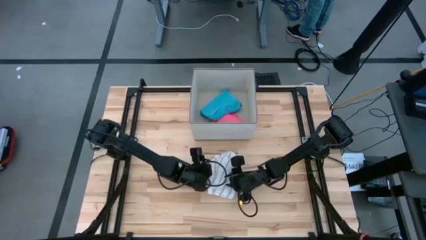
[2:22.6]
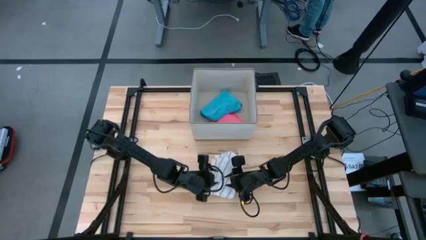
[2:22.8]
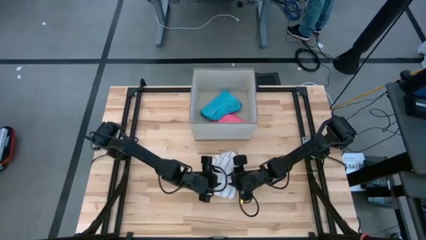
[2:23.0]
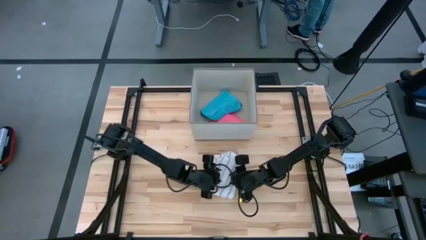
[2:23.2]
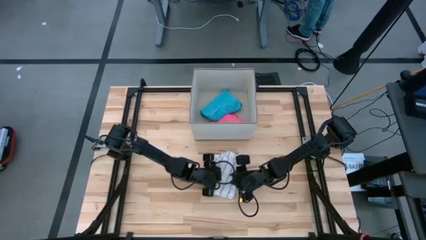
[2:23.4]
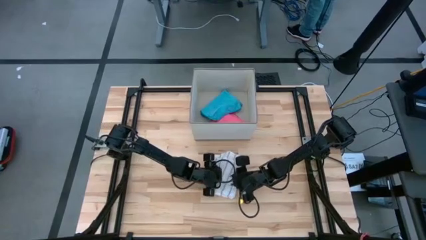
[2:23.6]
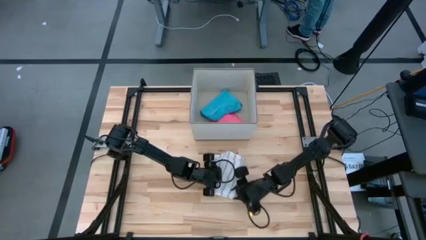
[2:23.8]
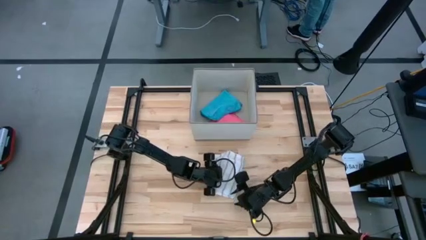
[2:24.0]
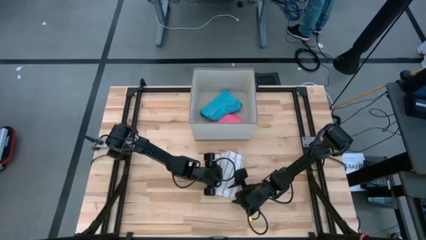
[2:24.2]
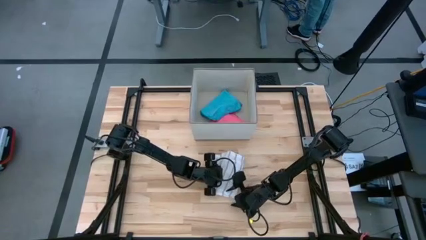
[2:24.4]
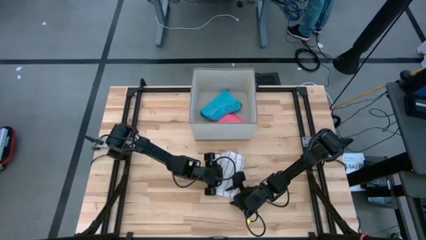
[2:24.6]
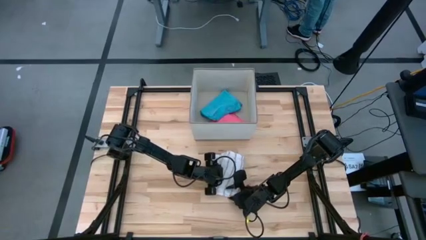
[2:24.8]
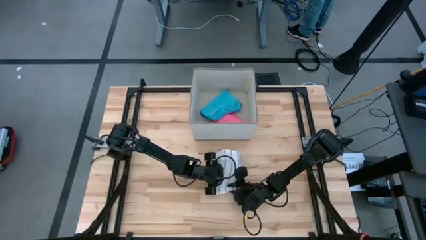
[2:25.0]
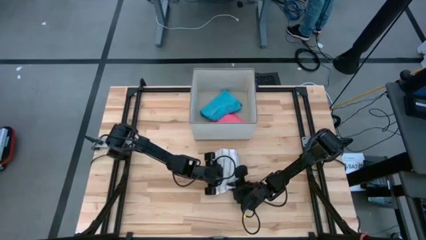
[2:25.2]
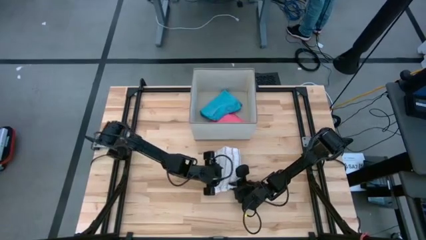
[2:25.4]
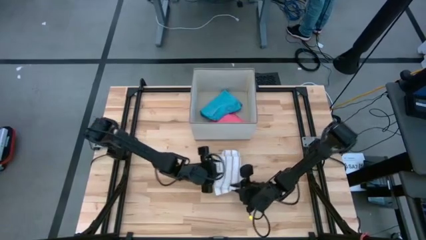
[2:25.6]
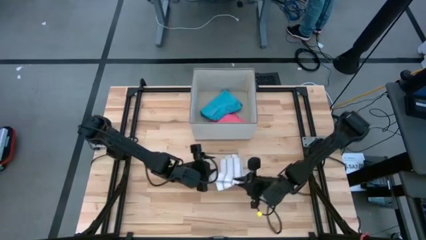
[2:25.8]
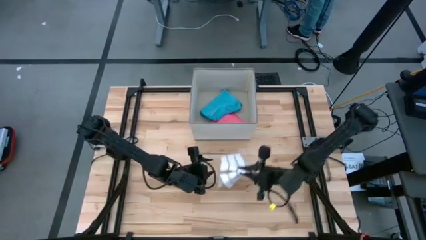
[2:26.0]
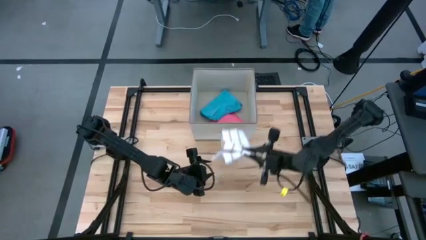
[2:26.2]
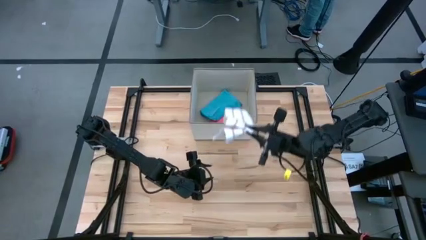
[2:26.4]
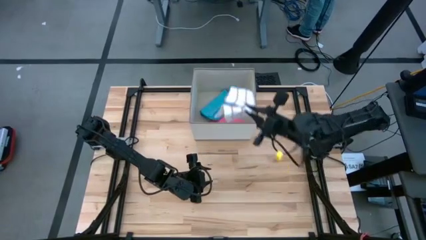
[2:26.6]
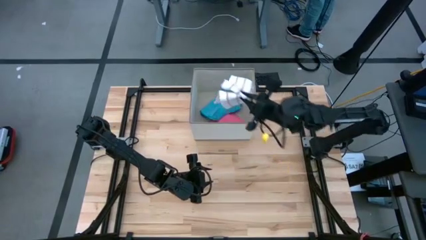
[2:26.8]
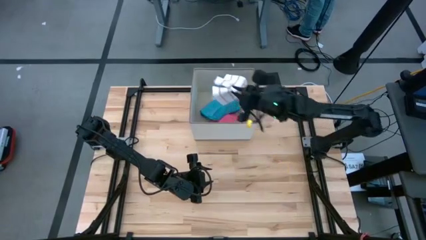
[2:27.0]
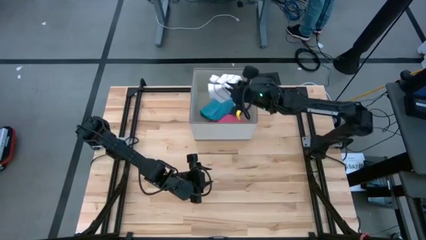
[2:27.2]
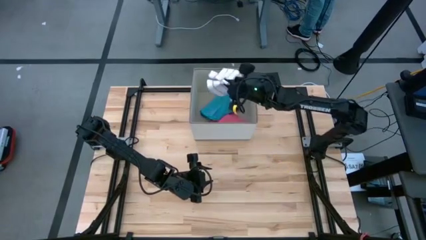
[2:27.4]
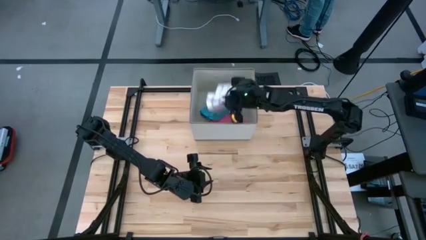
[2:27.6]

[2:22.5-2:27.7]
Task: Fold towel
Put the white towel into the laundry organizer

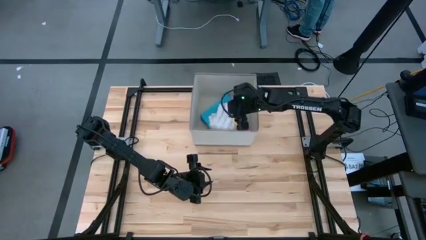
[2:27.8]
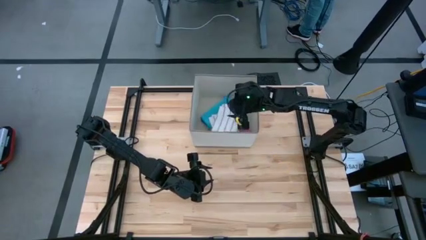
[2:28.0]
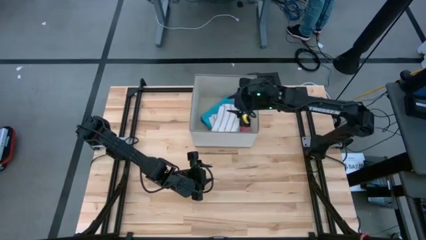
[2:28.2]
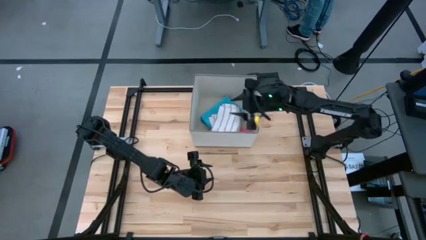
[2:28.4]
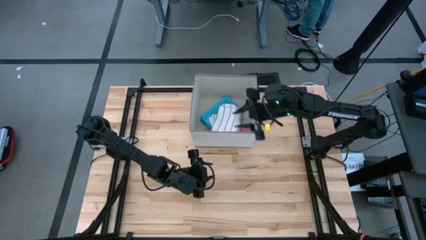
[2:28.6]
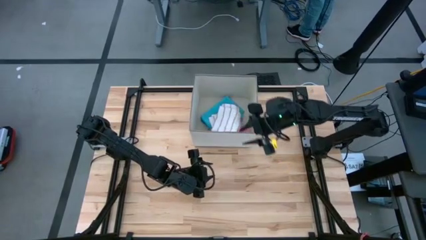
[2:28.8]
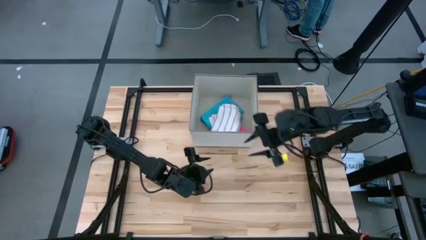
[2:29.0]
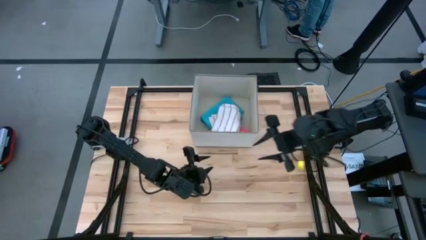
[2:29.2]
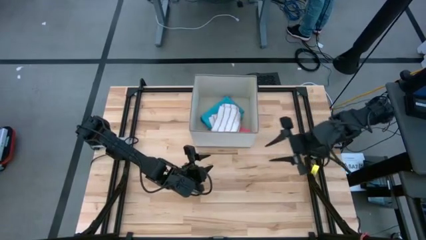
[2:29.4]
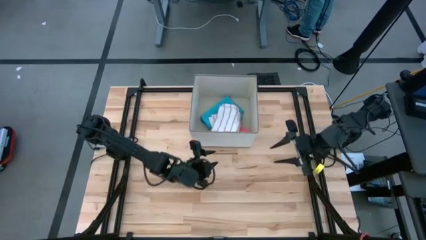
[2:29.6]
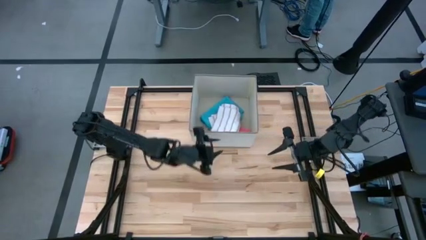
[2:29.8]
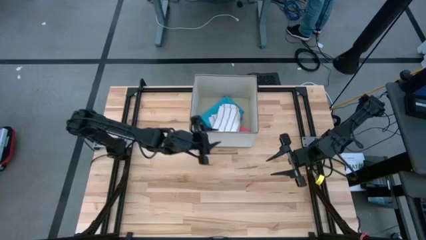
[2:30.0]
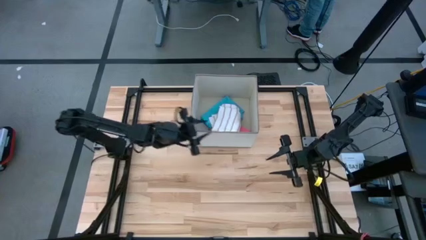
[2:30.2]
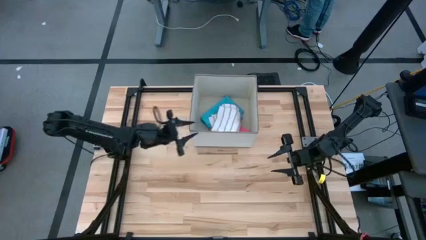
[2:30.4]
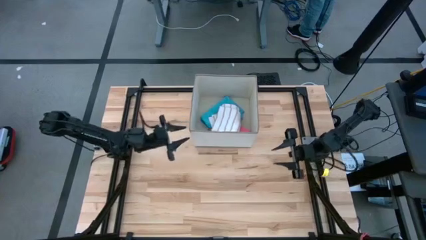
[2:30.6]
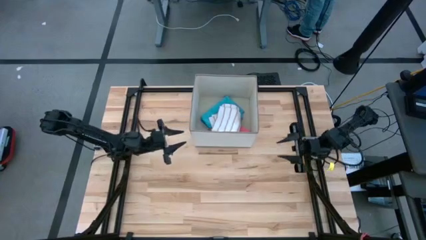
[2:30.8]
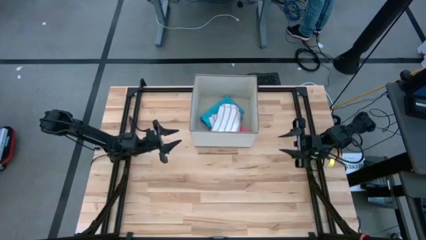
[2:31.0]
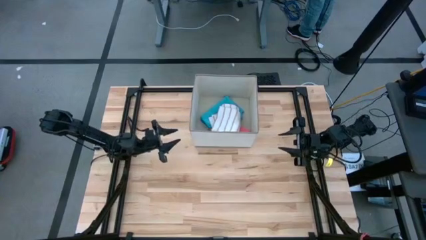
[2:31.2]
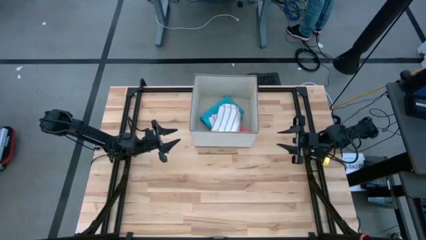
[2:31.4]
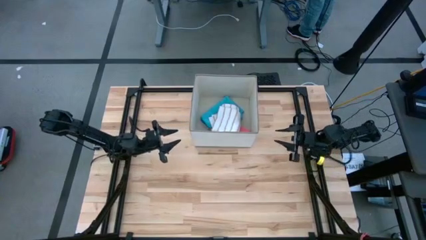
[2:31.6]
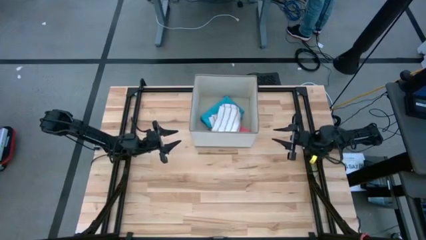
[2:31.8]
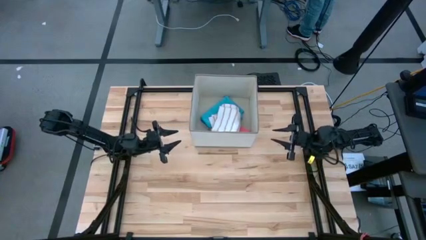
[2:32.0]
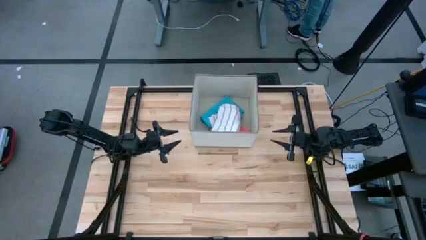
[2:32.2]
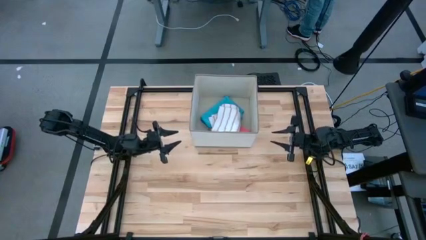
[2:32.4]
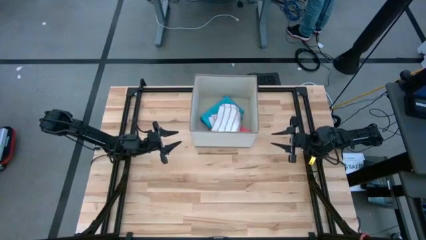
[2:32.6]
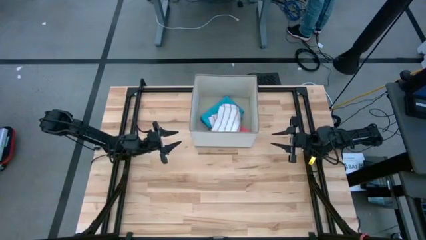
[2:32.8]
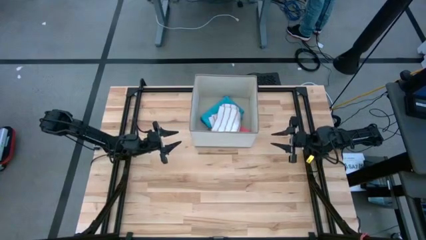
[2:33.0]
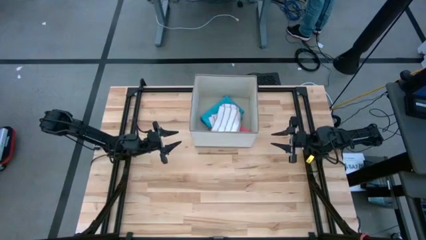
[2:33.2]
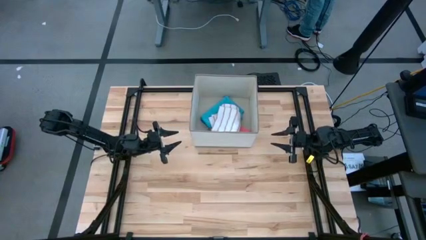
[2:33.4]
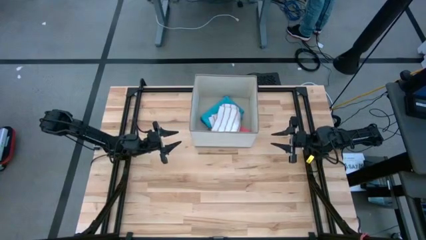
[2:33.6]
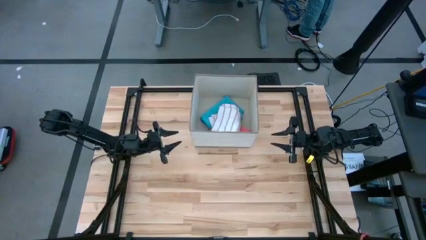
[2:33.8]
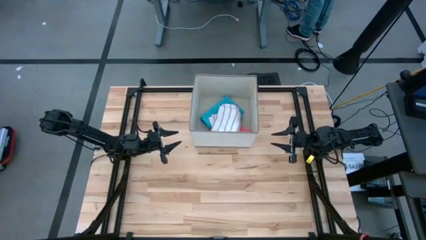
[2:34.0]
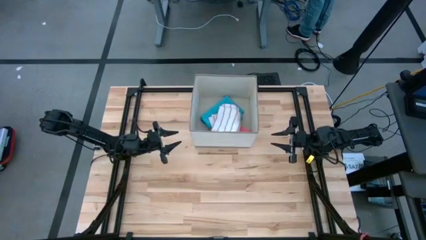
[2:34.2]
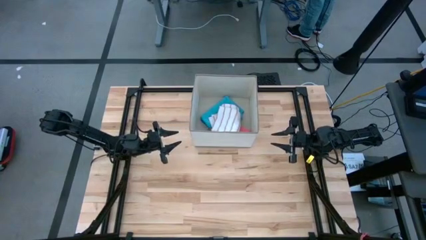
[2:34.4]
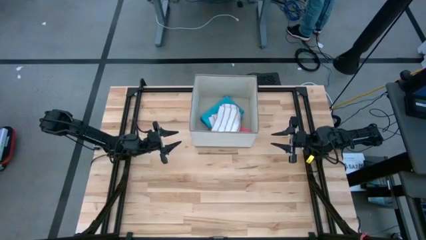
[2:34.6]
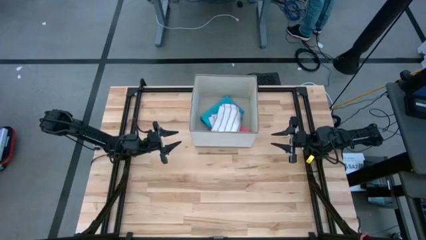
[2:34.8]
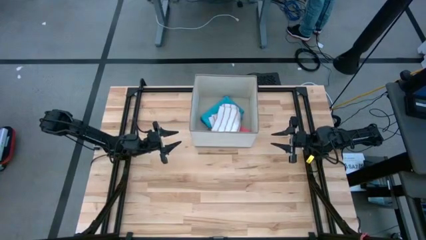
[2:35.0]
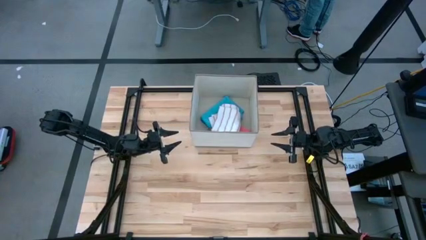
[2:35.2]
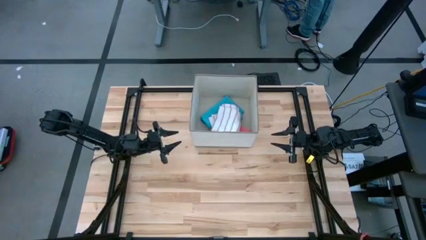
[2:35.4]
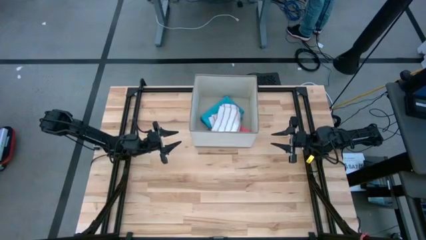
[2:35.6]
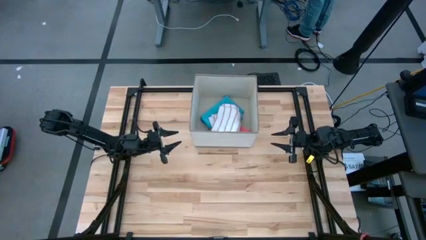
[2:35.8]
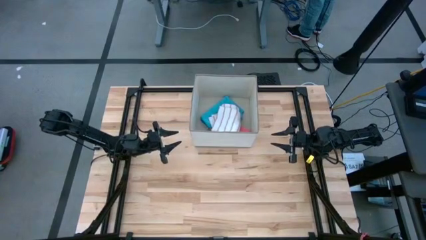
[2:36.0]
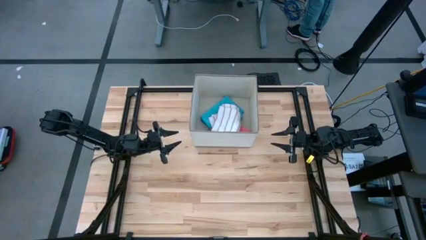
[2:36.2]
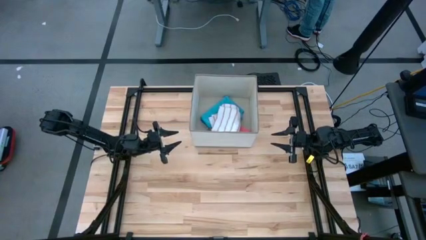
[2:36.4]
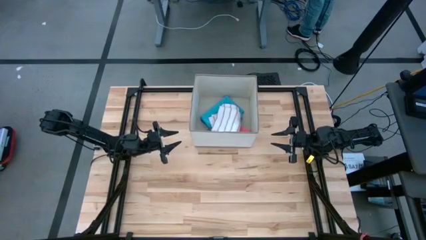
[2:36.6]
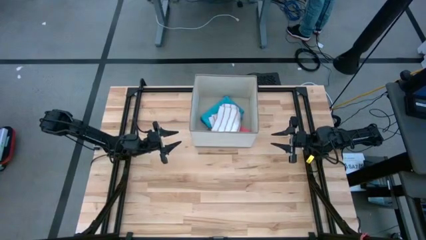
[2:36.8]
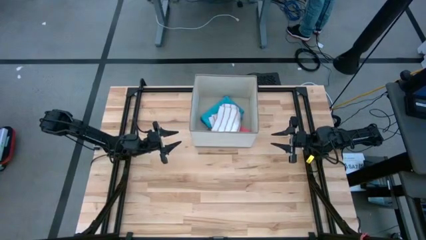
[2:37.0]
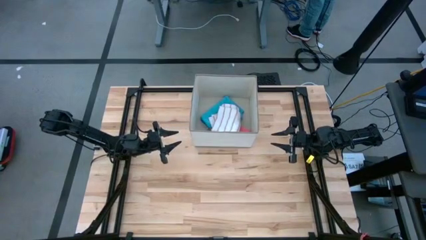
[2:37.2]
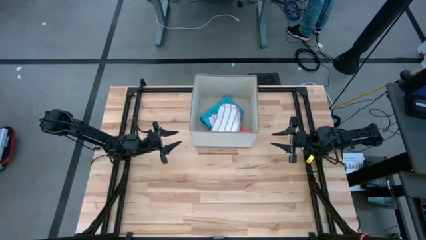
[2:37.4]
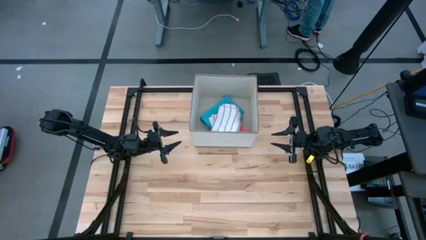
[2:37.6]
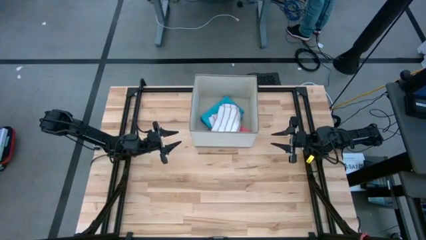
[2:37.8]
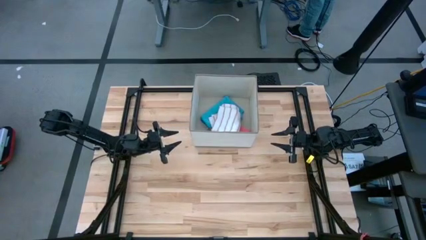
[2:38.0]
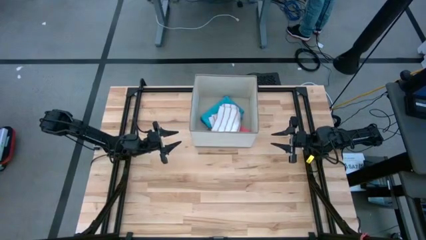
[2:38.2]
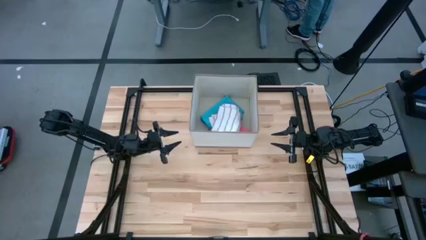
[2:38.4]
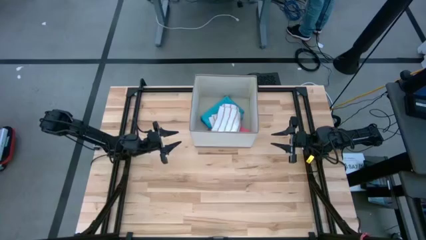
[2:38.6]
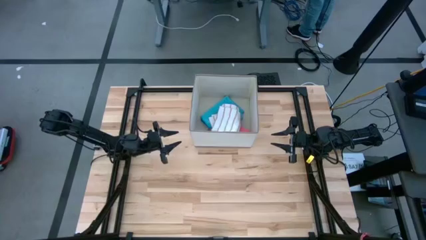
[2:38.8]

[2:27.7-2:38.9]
Return to Home Position
